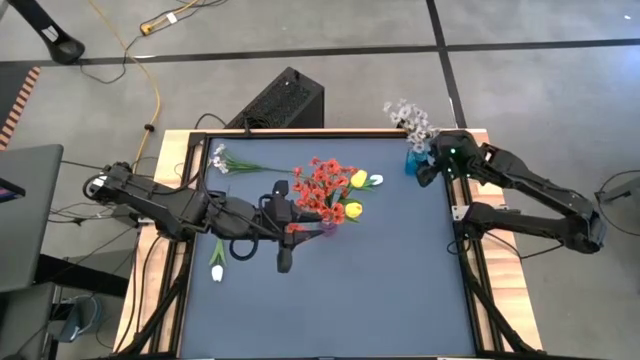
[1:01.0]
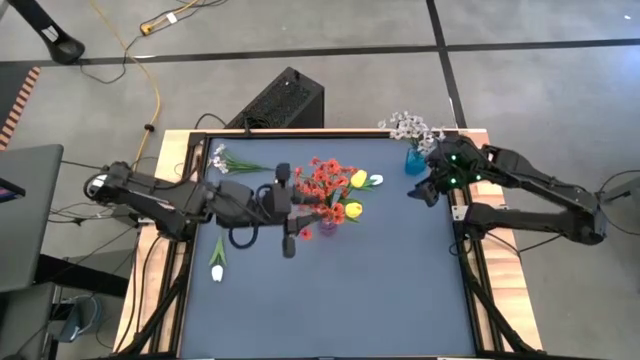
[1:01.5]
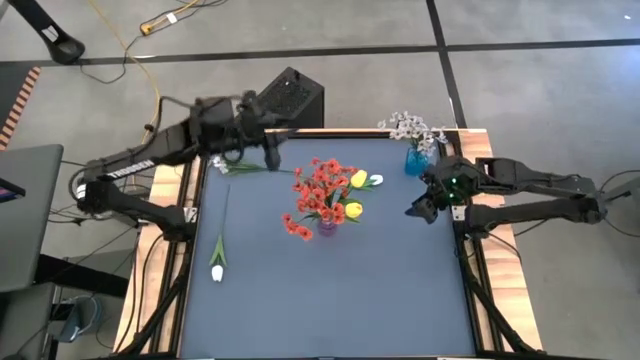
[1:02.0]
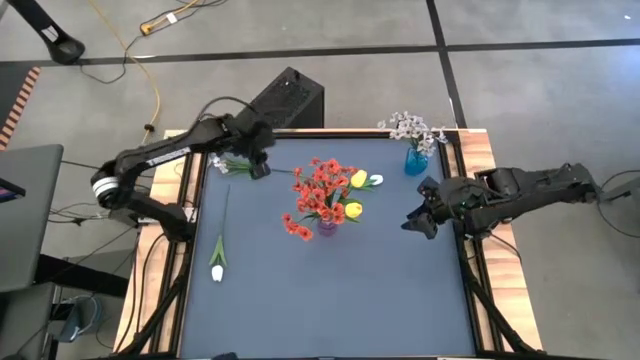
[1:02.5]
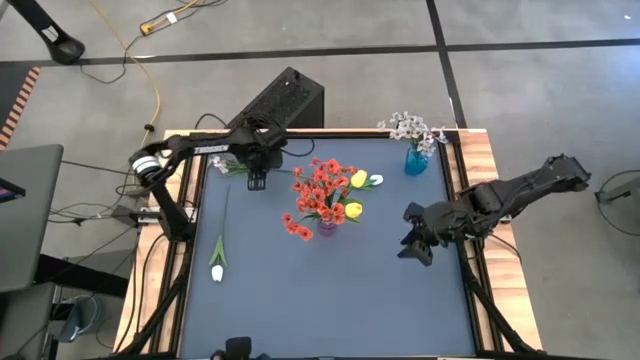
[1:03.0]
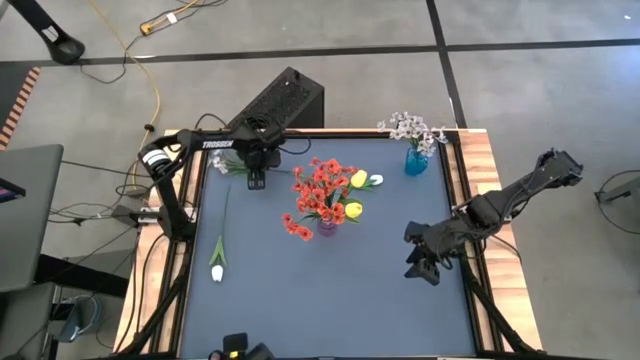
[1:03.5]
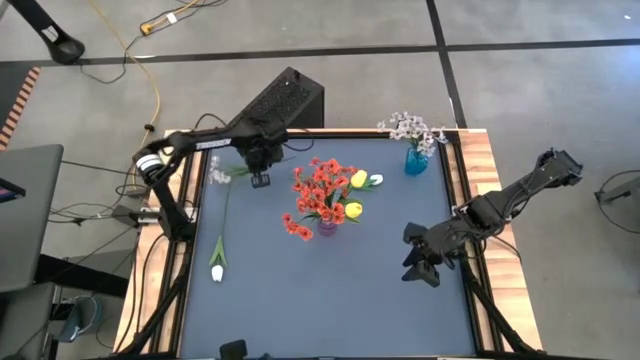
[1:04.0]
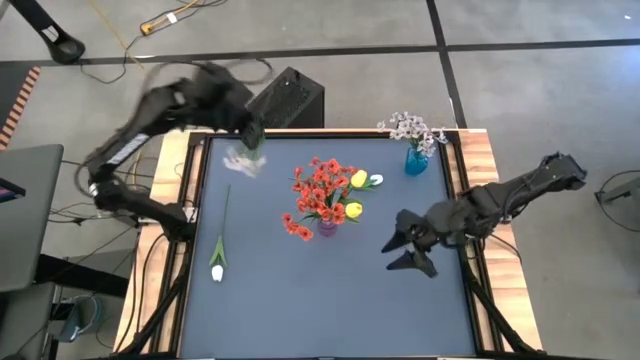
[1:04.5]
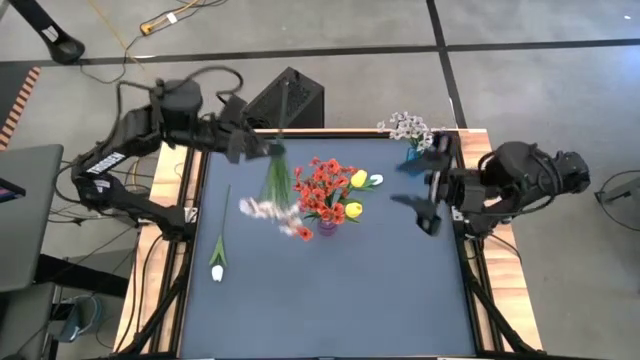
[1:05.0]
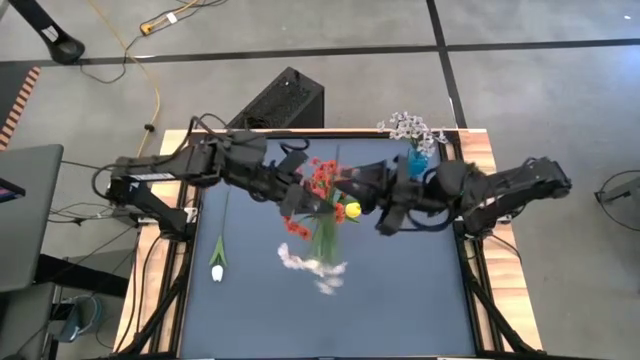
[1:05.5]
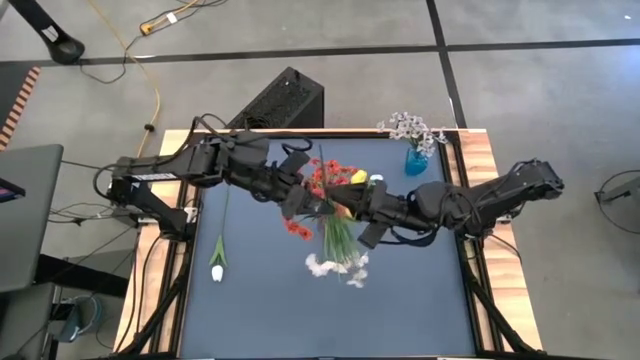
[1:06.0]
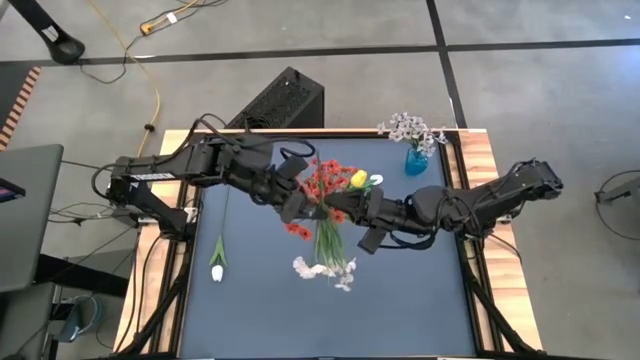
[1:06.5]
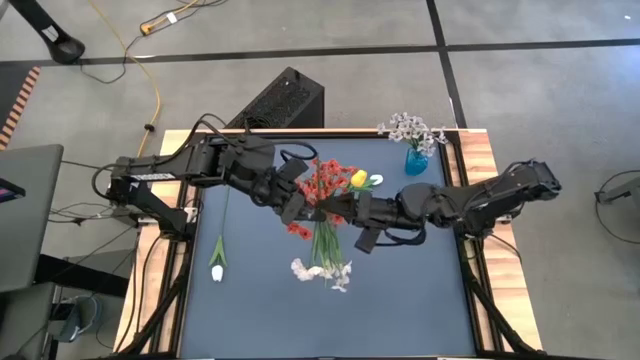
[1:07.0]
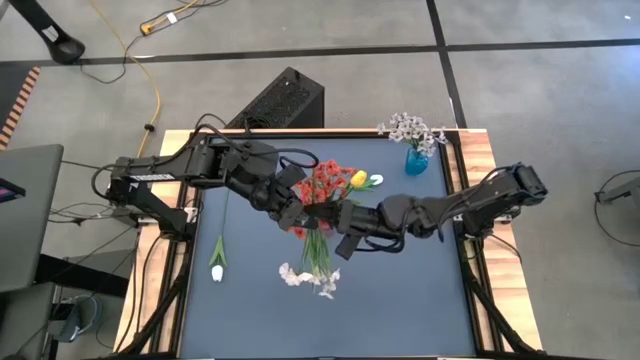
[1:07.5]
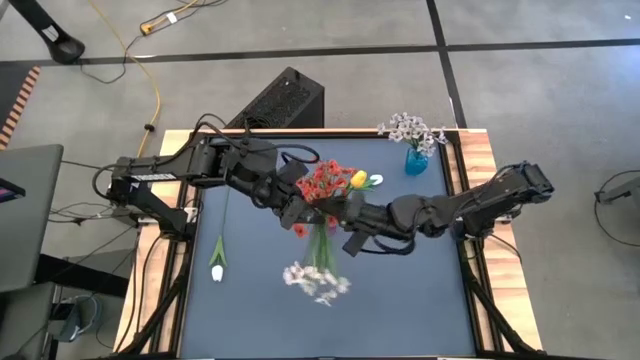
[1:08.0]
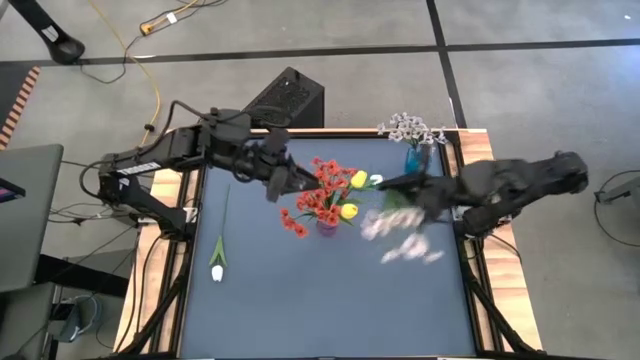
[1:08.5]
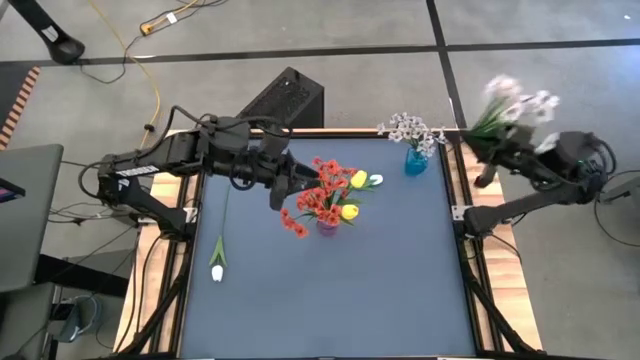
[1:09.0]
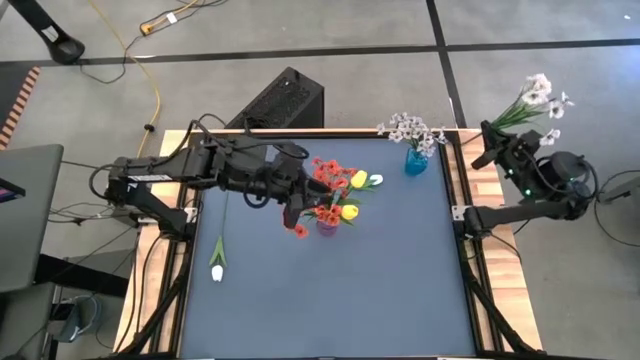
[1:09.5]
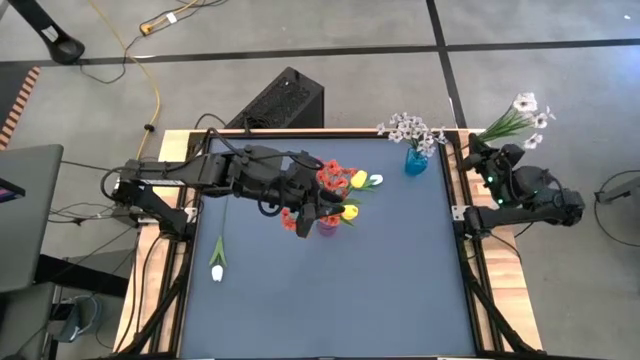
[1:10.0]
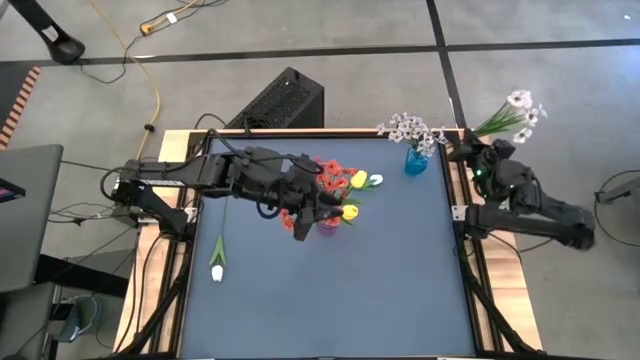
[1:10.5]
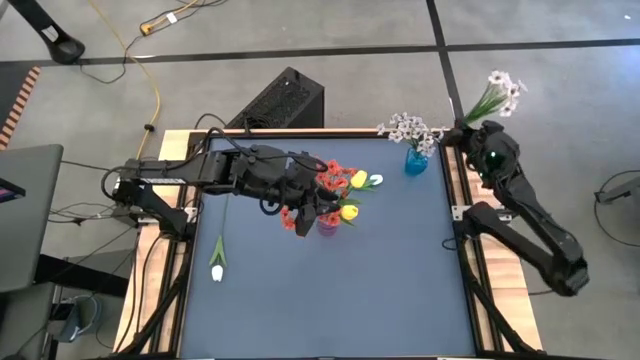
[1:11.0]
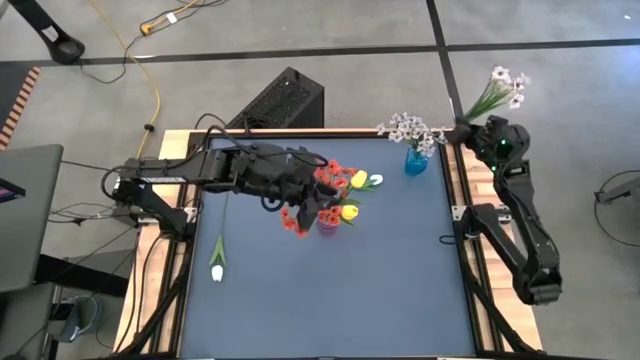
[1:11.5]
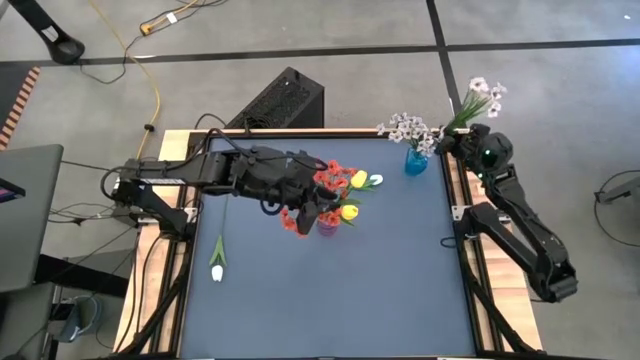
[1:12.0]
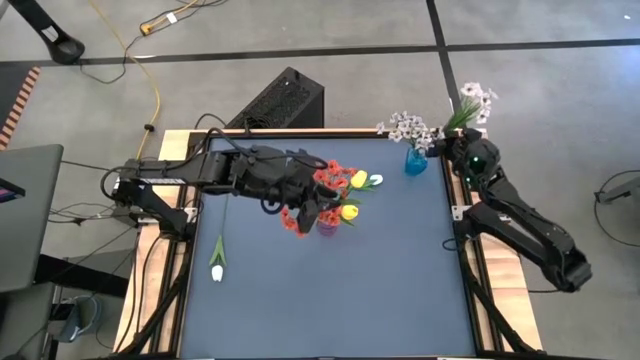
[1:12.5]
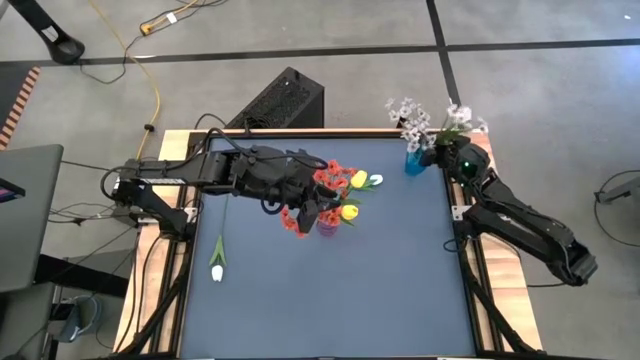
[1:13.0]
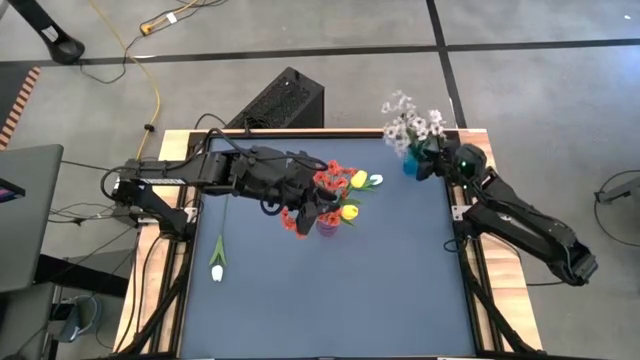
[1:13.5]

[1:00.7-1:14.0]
Task: Sort flowers into vase by color
Put the white flower into the blue vase

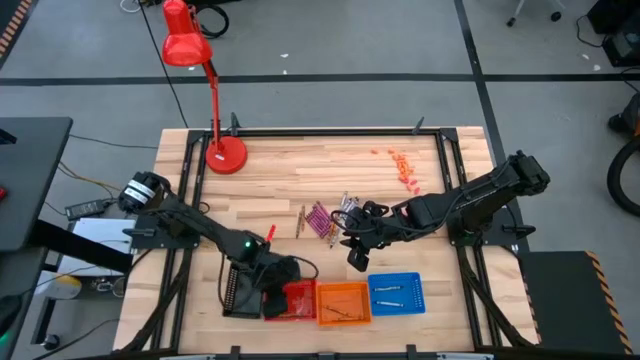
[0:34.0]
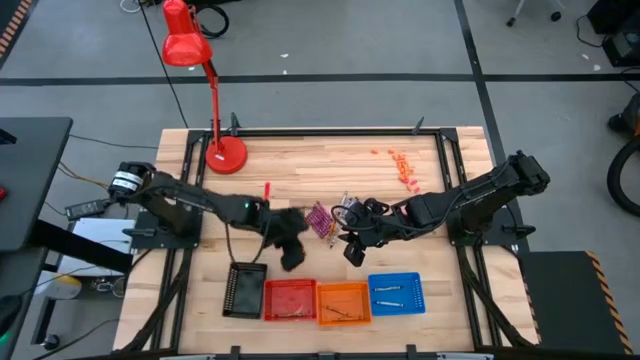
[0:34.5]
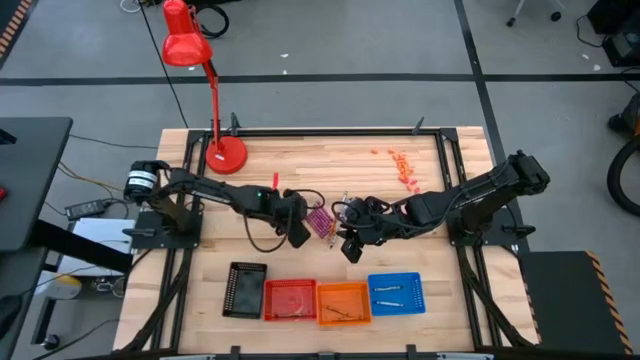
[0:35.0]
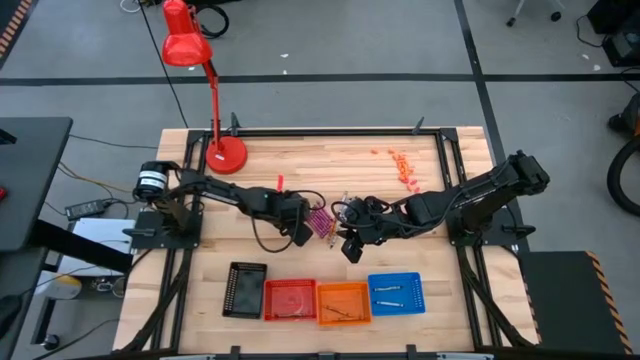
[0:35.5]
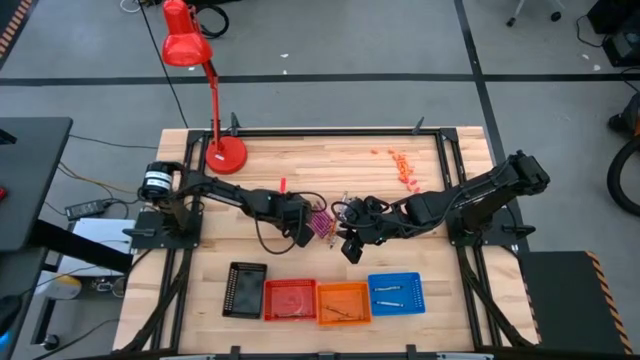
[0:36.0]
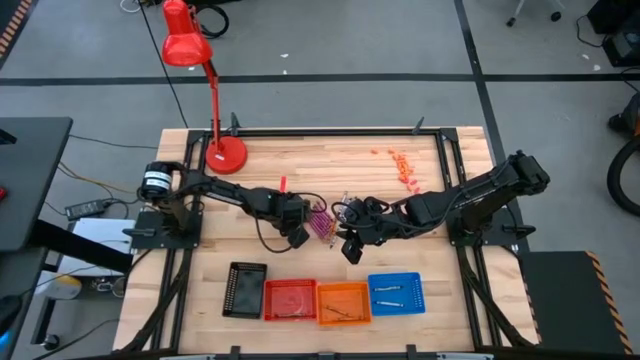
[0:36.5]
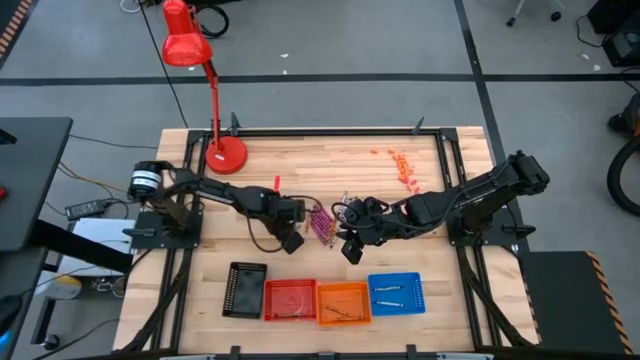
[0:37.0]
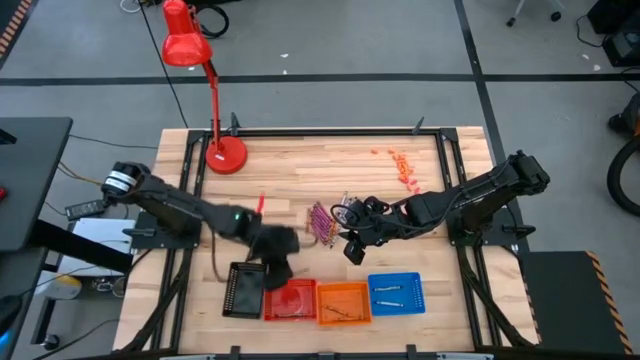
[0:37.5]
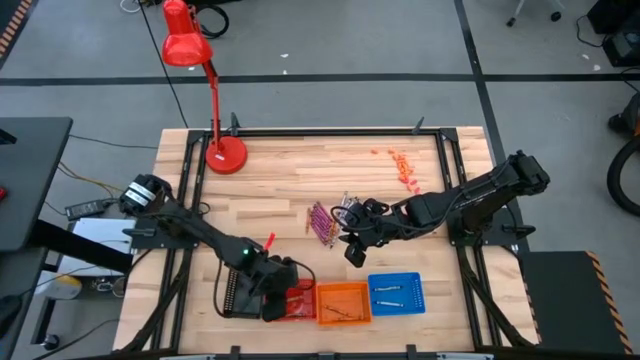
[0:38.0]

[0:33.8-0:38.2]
Task: Sort crayons
Put the brown crayon into the red bin
